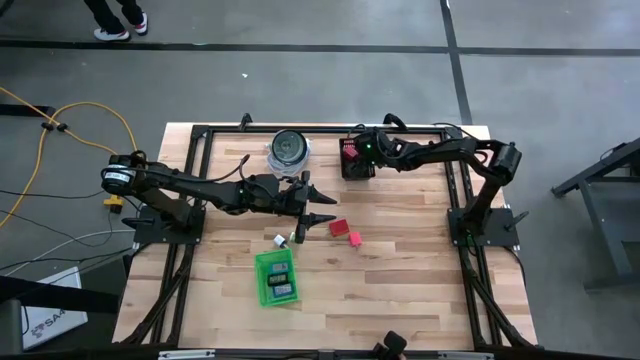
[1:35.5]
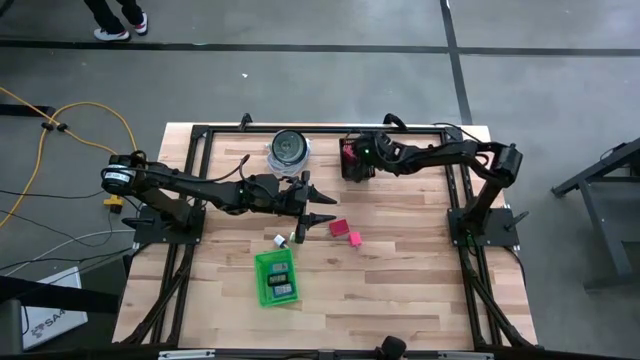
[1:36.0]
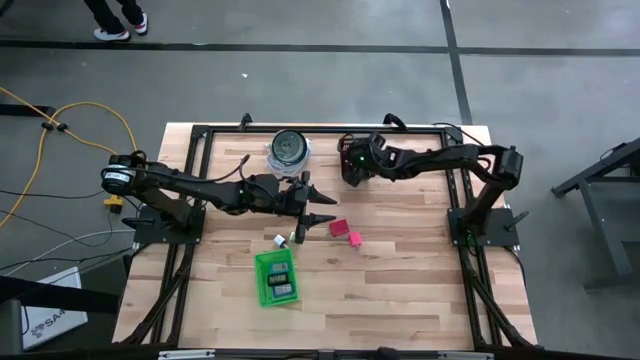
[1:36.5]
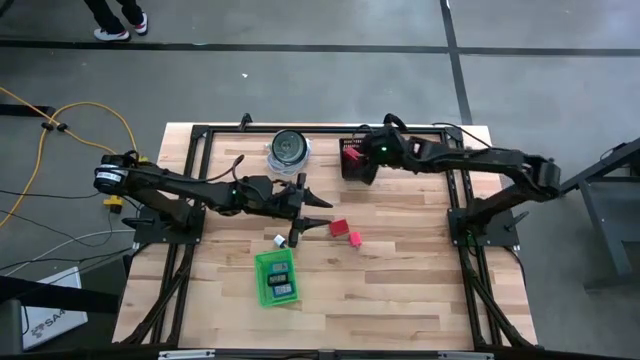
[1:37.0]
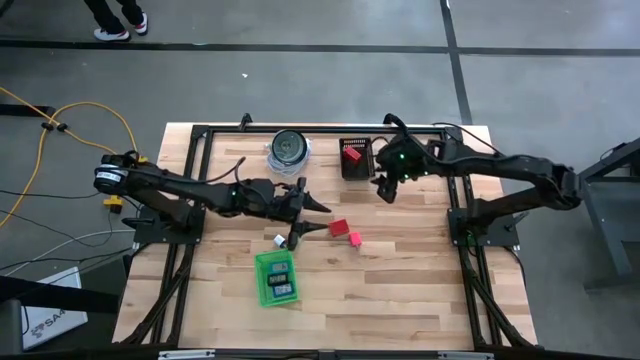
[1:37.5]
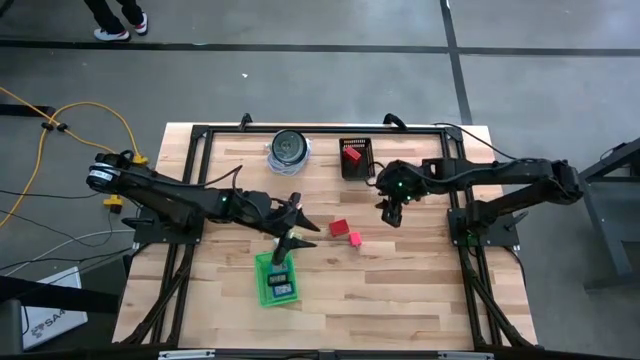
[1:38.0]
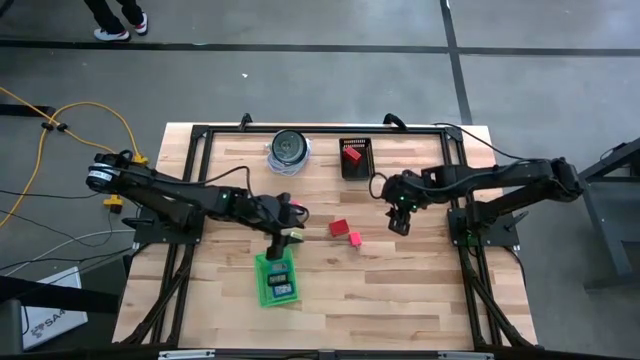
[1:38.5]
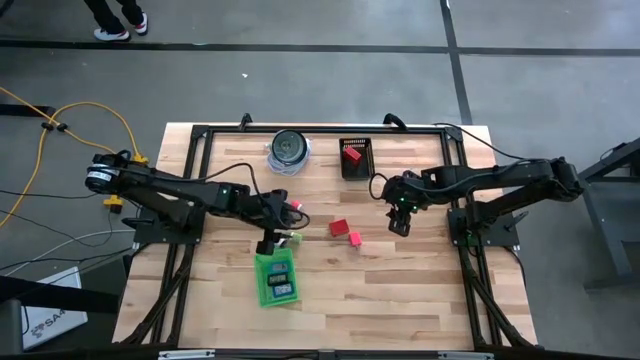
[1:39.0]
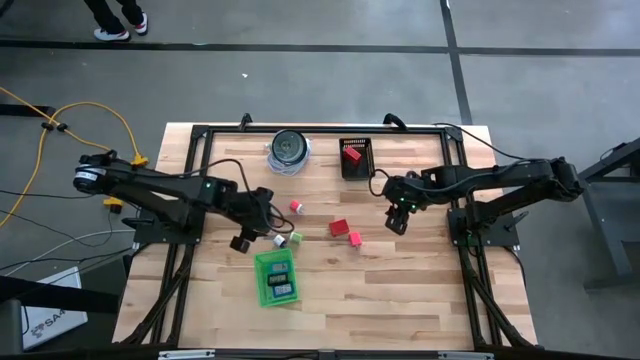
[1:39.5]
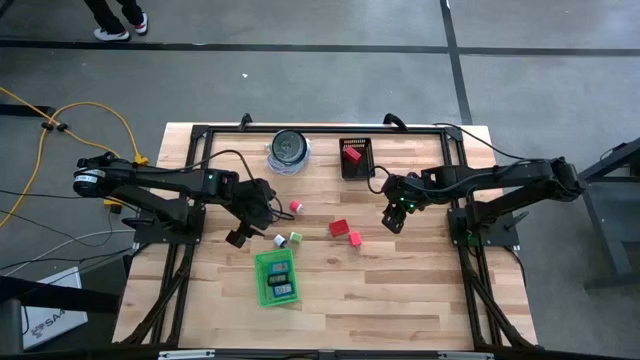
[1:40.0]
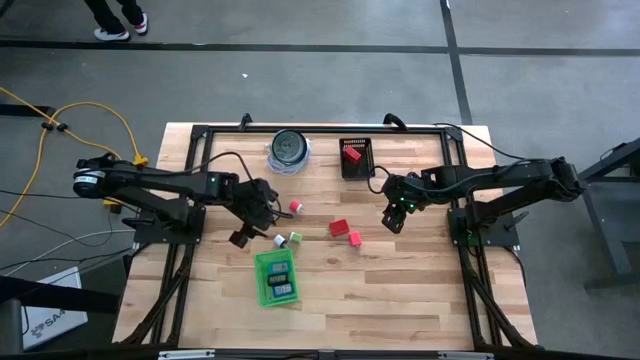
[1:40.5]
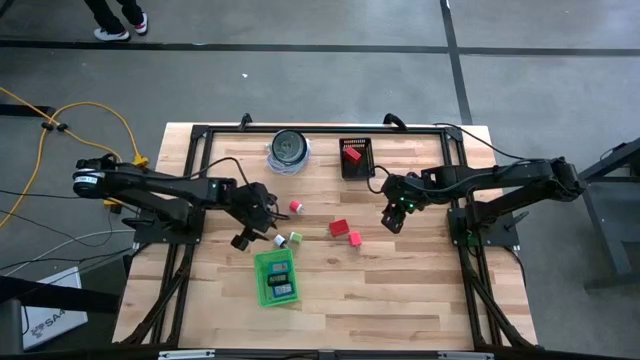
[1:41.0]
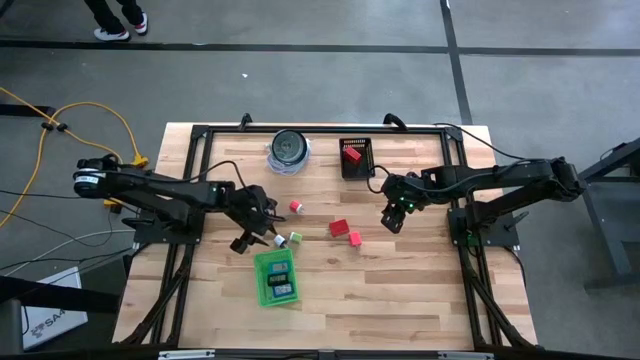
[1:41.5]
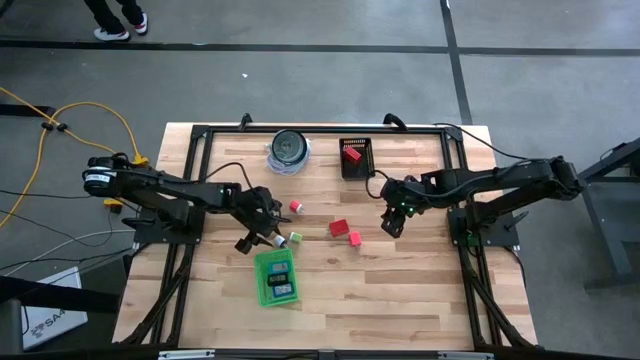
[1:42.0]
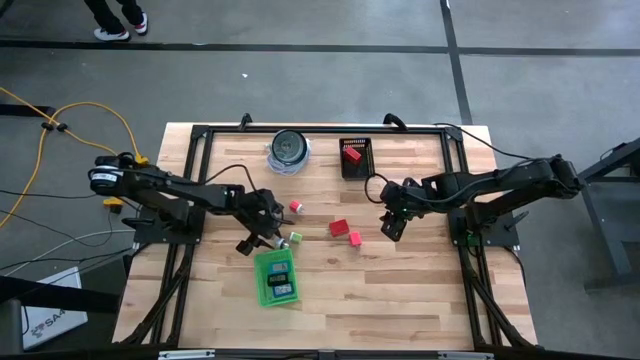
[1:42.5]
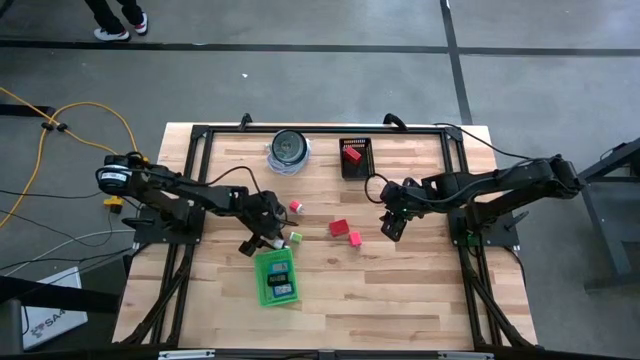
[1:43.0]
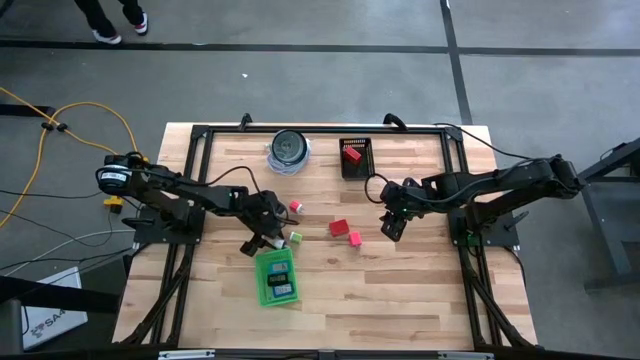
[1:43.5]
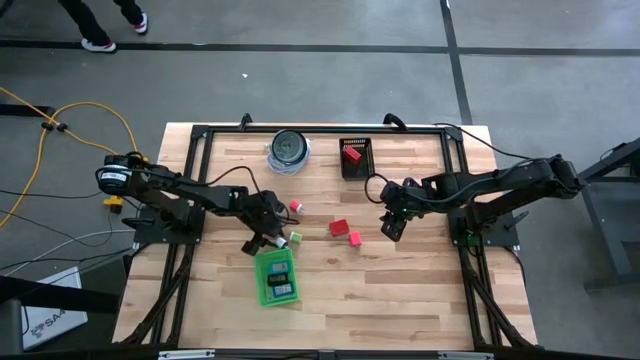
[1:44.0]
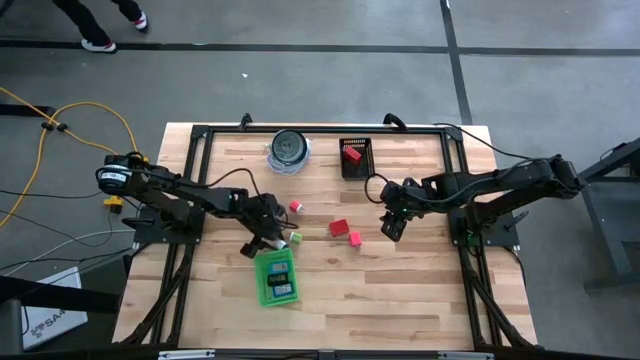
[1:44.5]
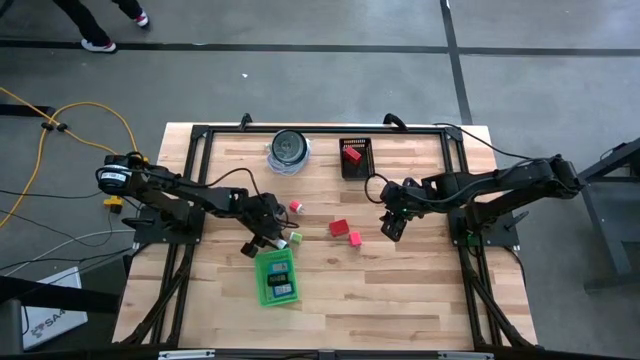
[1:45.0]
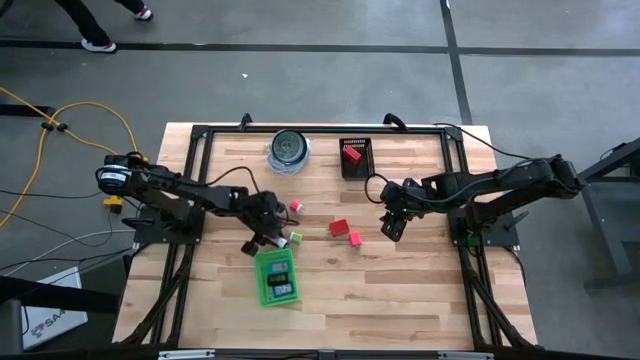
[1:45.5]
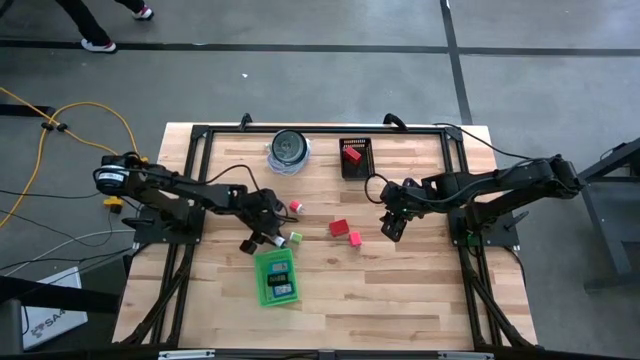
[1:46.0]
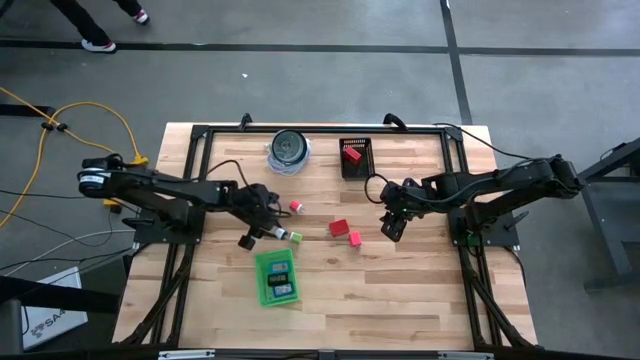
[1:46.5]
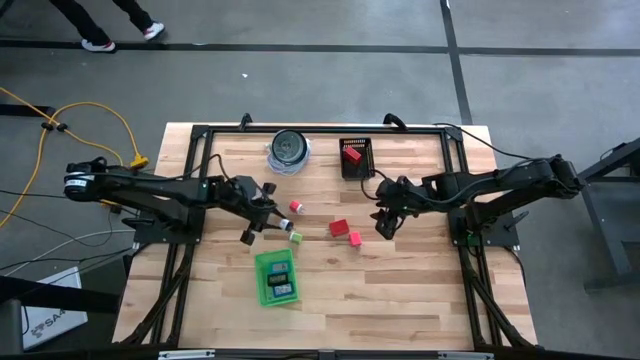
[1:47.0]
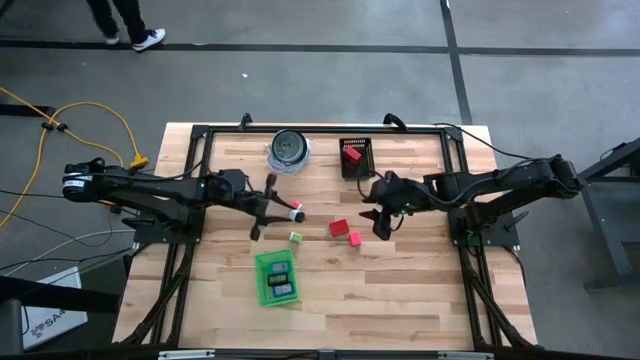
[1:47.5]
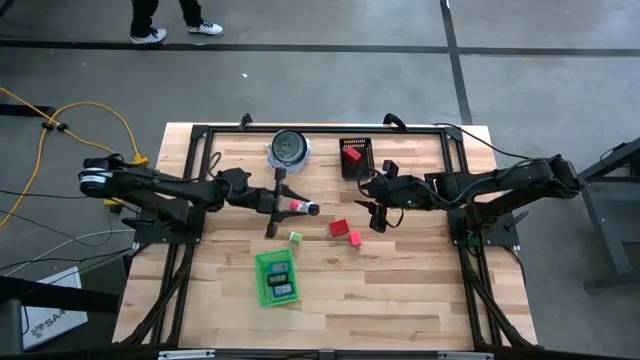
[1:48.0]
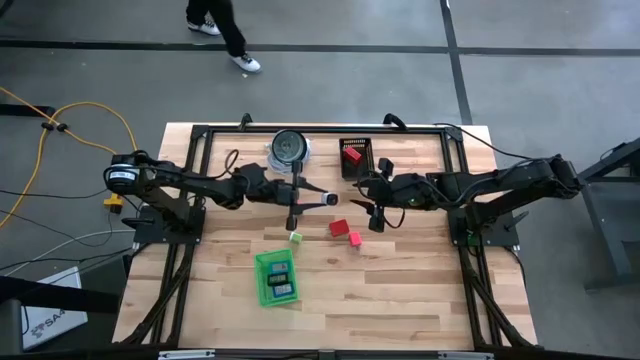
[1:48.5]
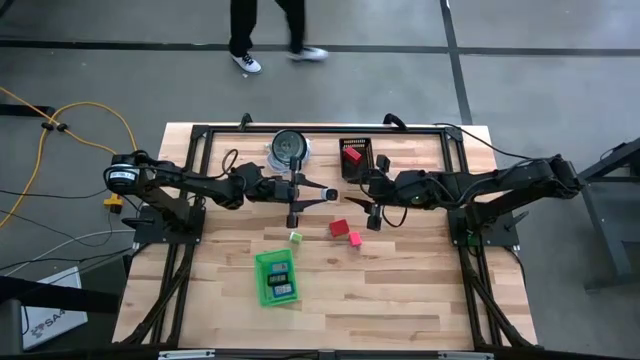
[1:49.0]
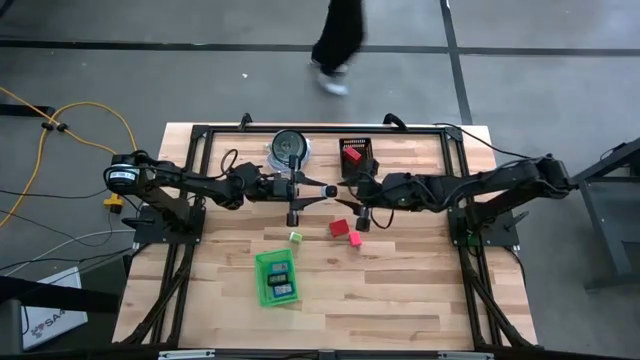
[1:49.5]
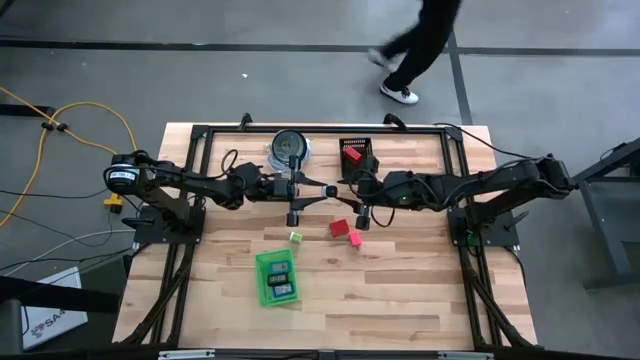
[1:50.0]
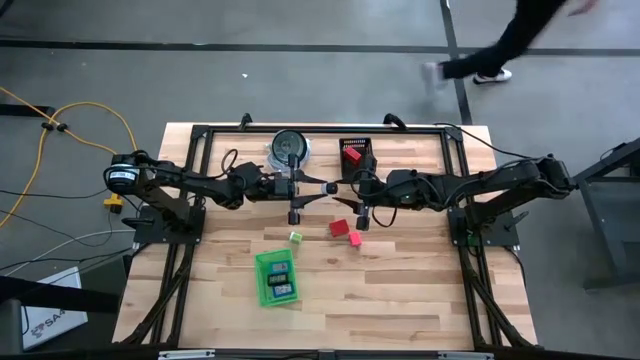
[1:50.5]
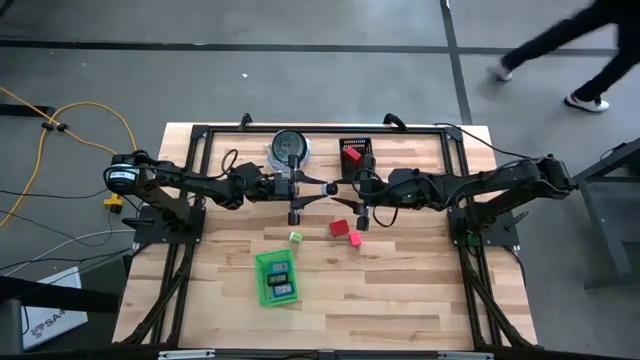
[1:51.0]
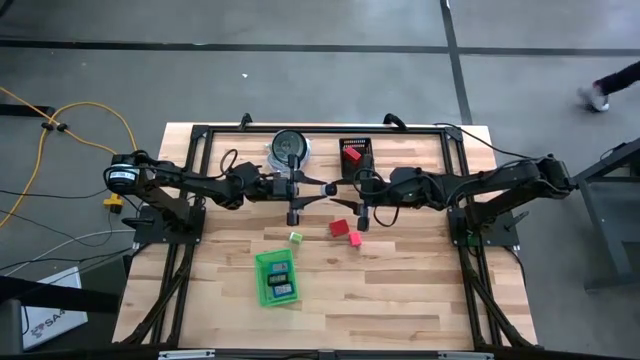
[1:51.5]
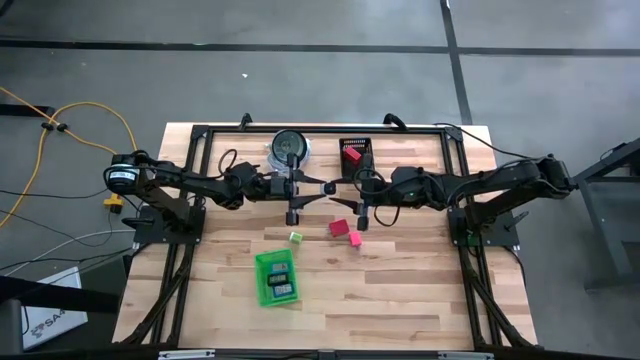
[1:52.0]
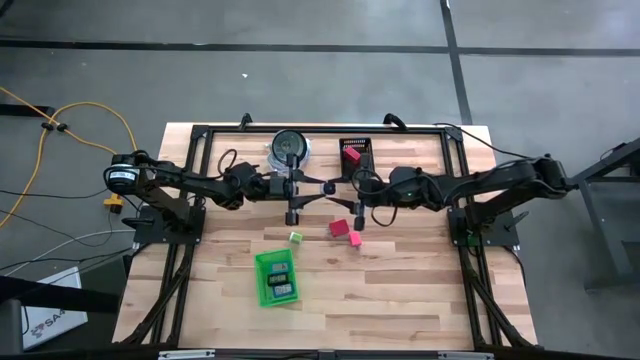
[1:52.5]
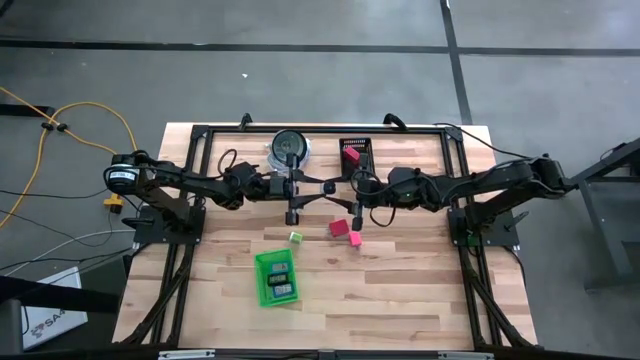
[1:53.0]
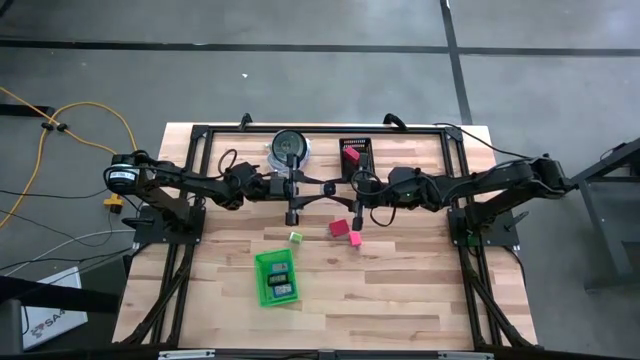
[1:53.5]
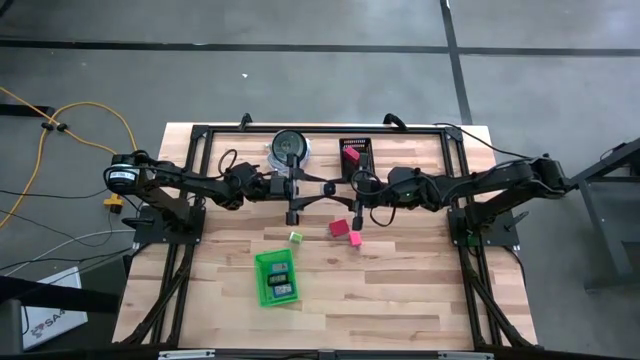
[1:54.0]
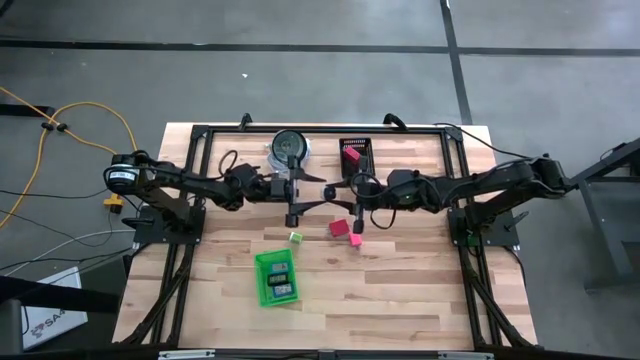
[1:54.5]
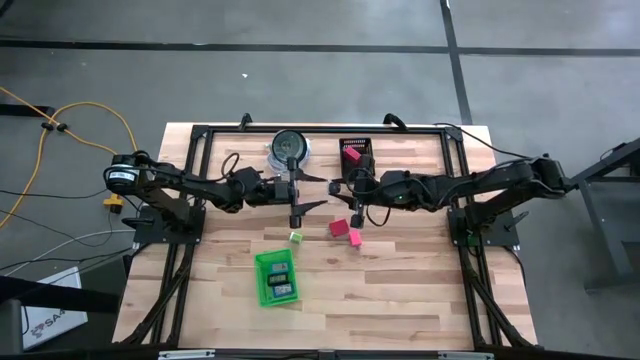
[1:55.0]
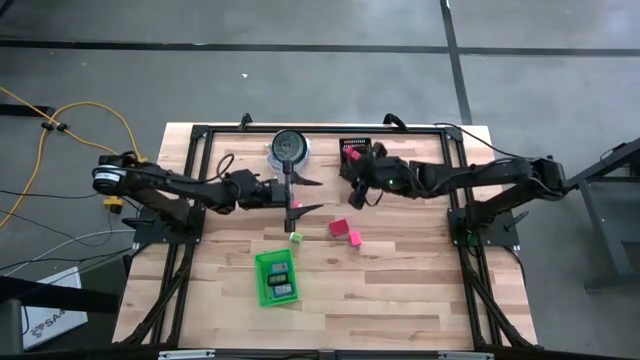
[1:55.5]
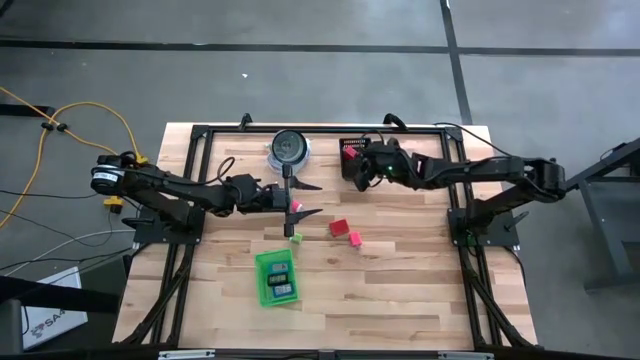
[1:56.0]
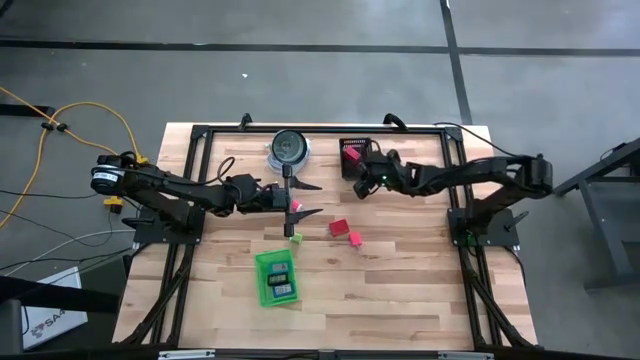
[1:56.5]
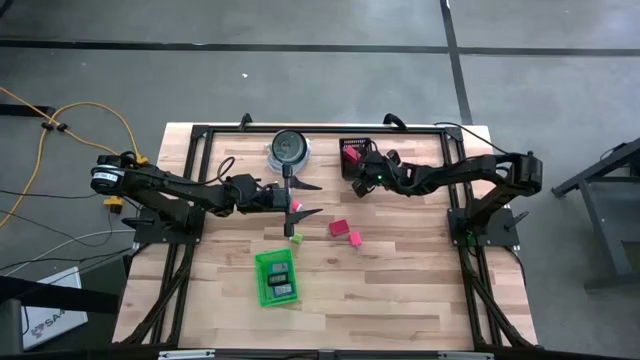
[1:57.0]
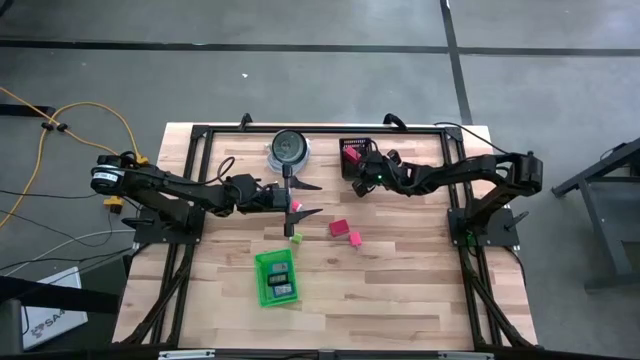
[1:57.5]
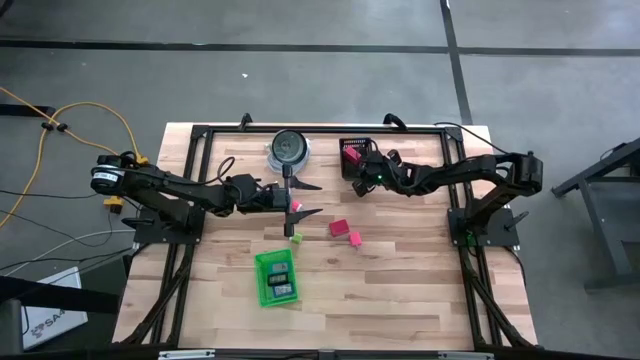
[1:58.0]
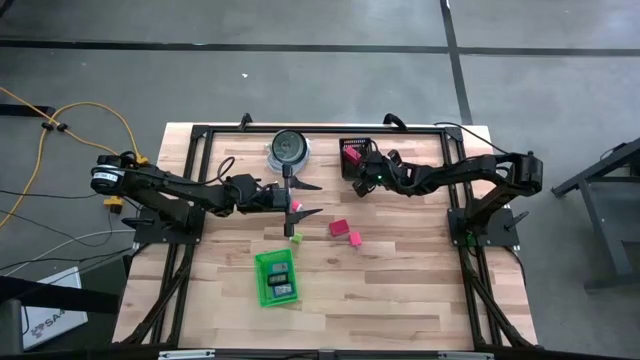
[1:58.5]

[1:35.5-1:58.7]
Task: Pick & Place Office items
Put the white charger adapter into the black bin
